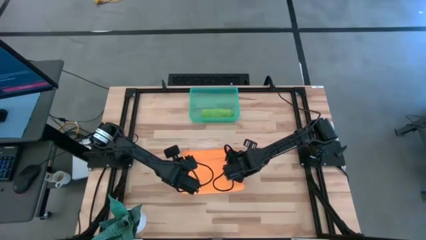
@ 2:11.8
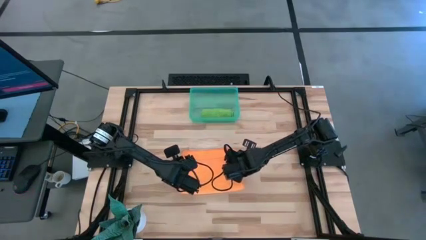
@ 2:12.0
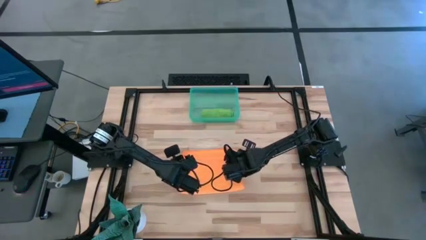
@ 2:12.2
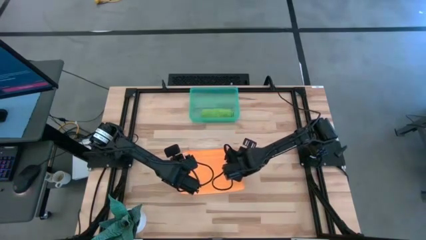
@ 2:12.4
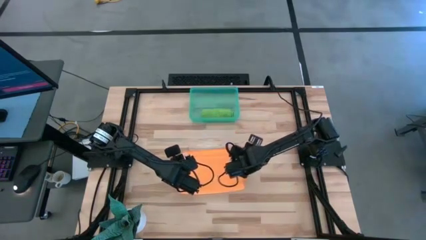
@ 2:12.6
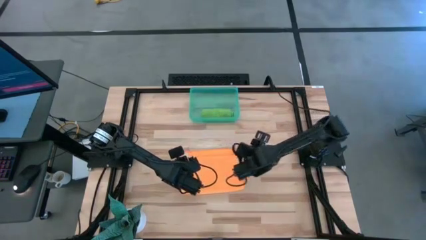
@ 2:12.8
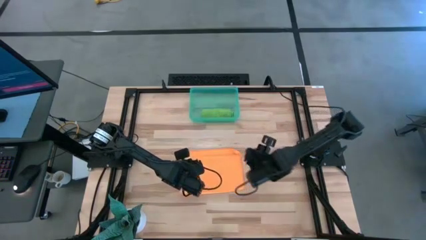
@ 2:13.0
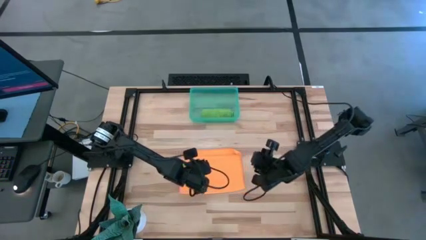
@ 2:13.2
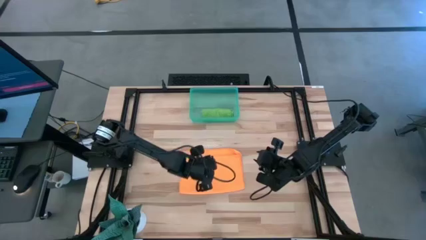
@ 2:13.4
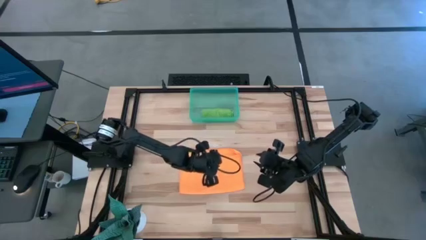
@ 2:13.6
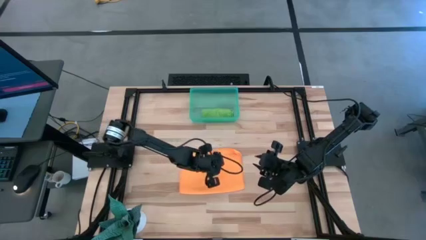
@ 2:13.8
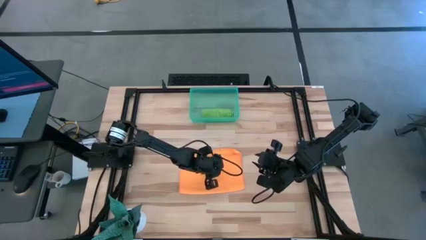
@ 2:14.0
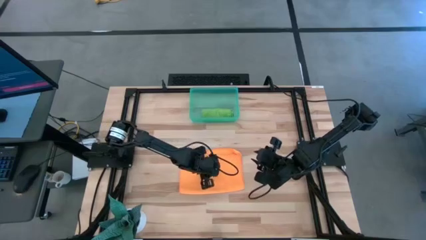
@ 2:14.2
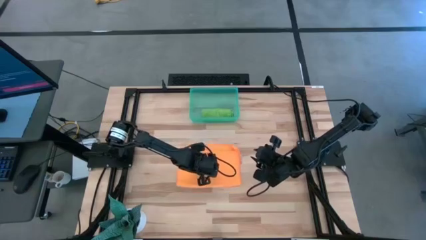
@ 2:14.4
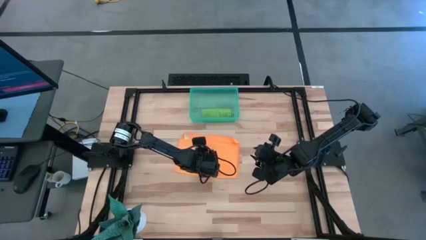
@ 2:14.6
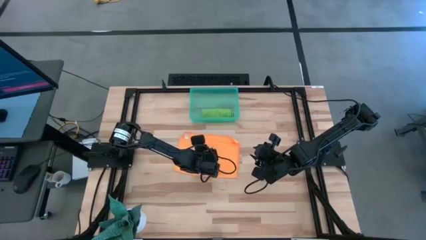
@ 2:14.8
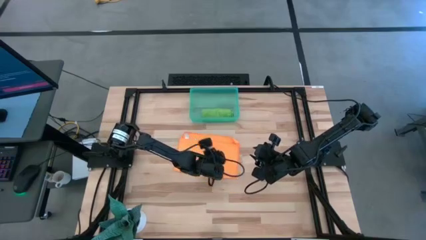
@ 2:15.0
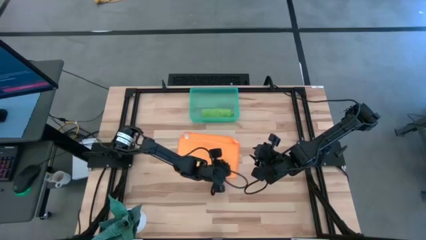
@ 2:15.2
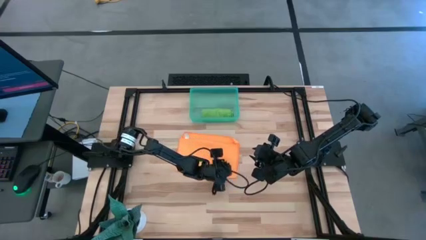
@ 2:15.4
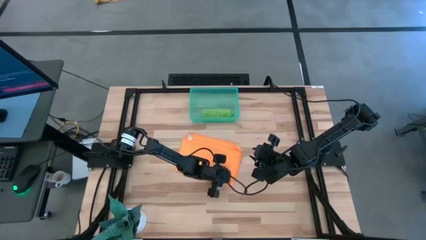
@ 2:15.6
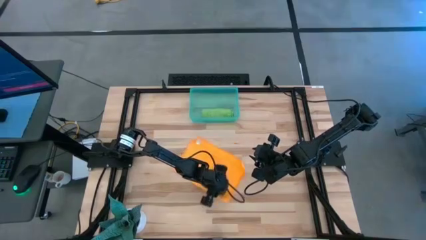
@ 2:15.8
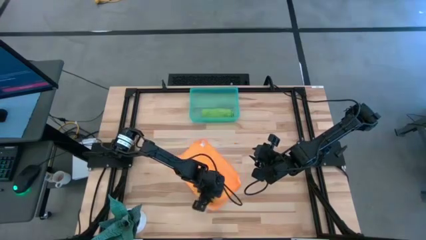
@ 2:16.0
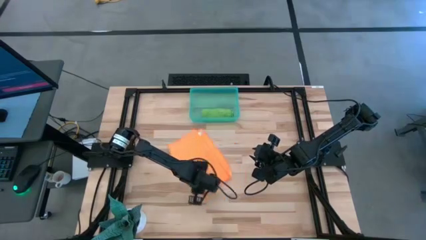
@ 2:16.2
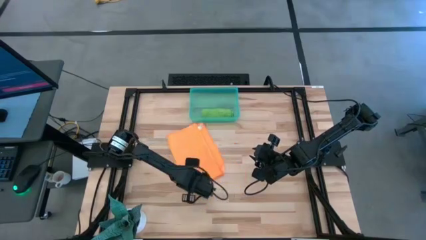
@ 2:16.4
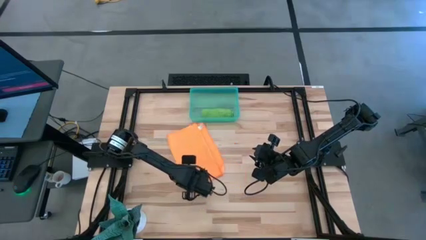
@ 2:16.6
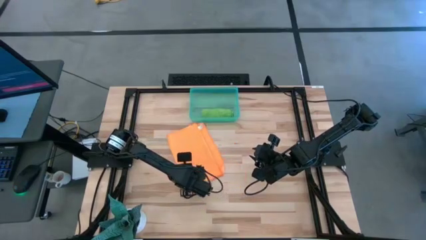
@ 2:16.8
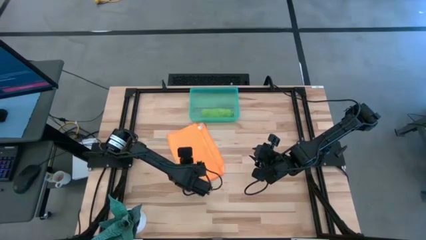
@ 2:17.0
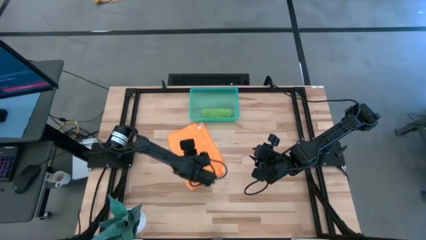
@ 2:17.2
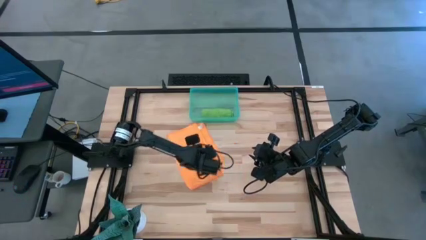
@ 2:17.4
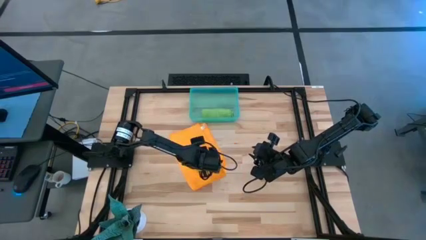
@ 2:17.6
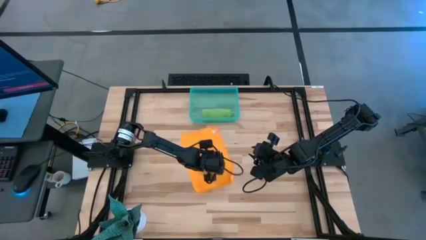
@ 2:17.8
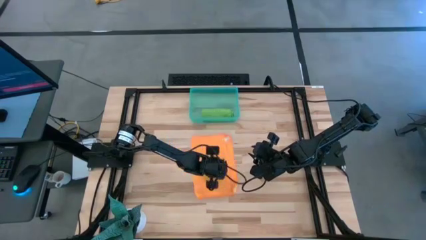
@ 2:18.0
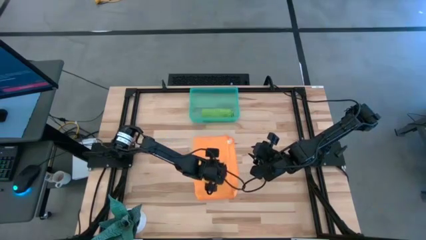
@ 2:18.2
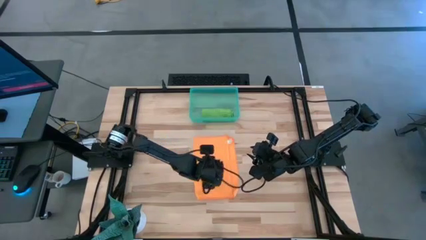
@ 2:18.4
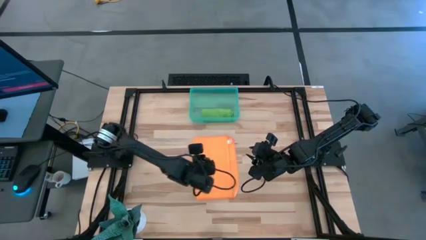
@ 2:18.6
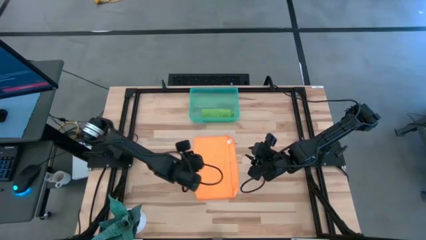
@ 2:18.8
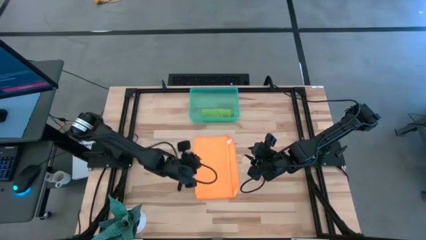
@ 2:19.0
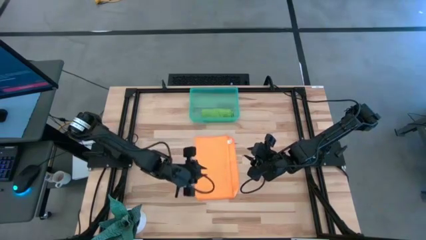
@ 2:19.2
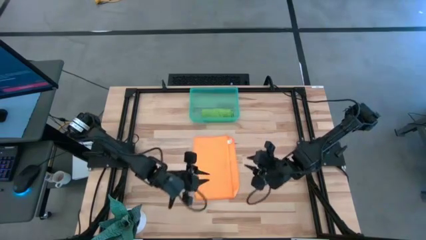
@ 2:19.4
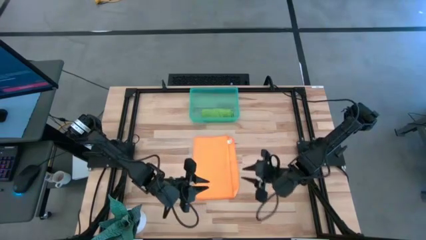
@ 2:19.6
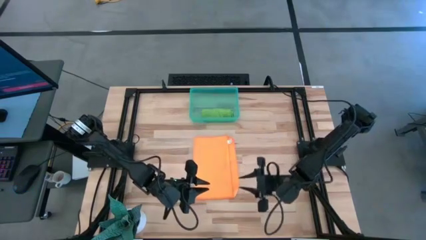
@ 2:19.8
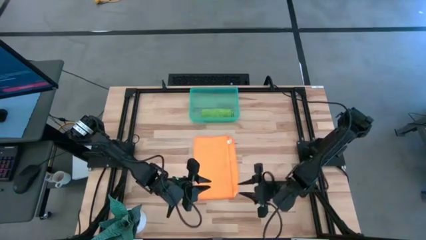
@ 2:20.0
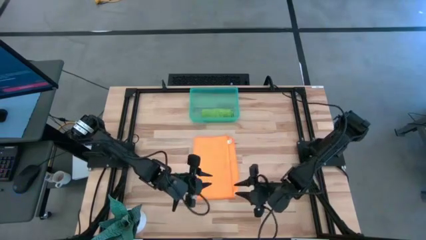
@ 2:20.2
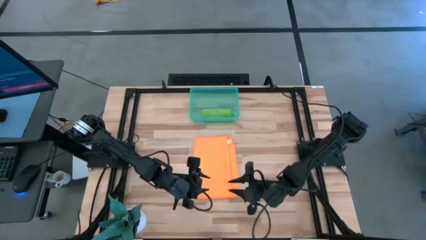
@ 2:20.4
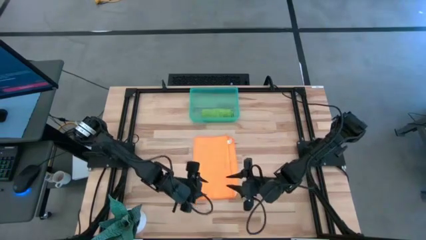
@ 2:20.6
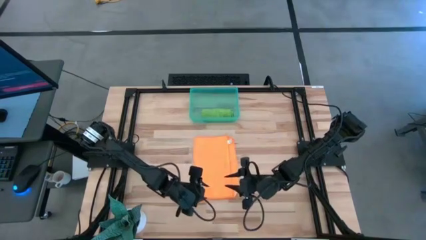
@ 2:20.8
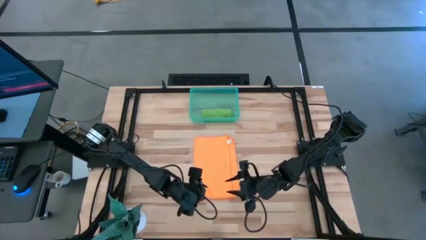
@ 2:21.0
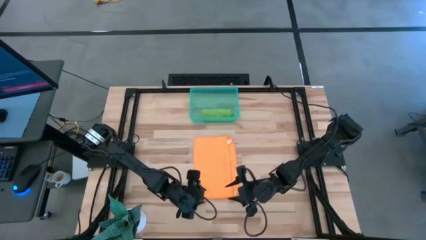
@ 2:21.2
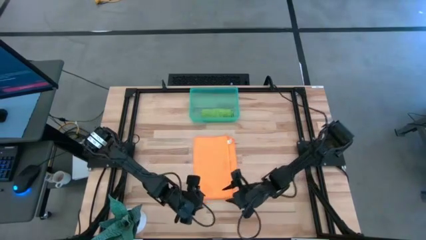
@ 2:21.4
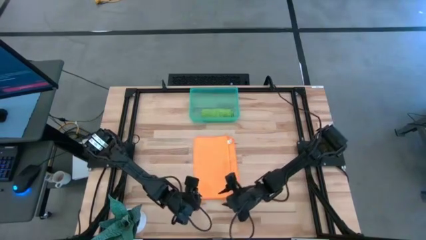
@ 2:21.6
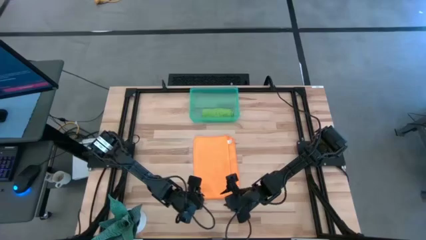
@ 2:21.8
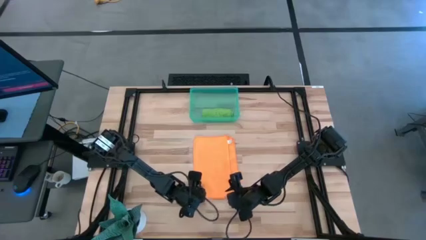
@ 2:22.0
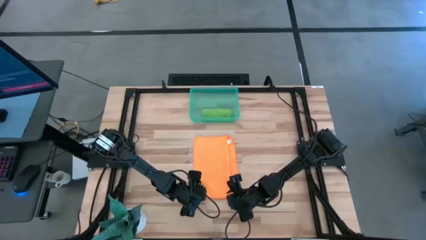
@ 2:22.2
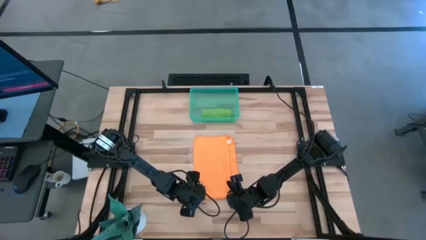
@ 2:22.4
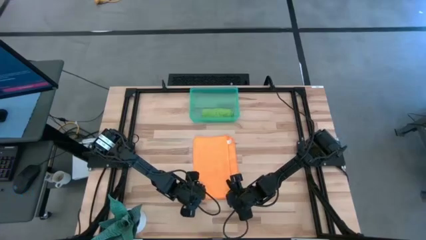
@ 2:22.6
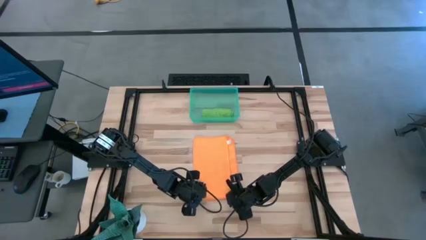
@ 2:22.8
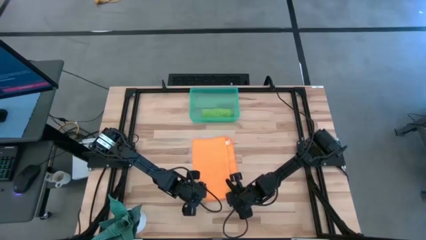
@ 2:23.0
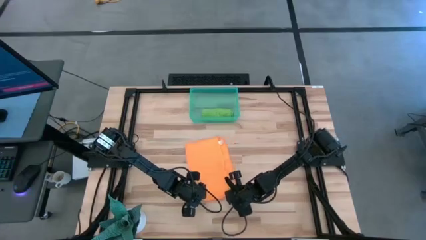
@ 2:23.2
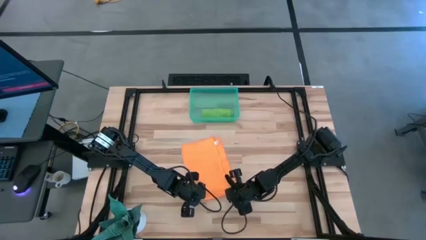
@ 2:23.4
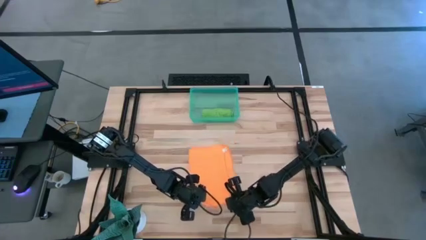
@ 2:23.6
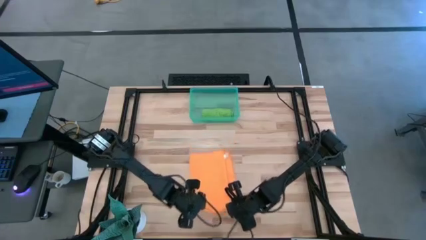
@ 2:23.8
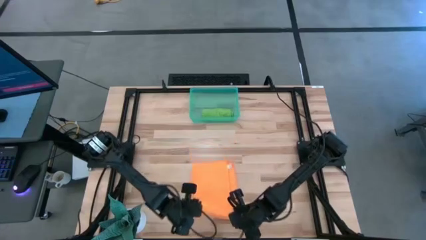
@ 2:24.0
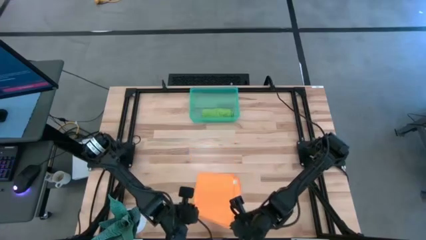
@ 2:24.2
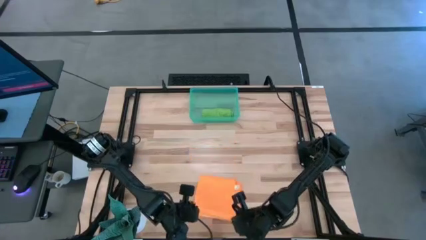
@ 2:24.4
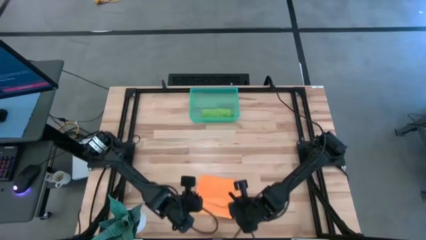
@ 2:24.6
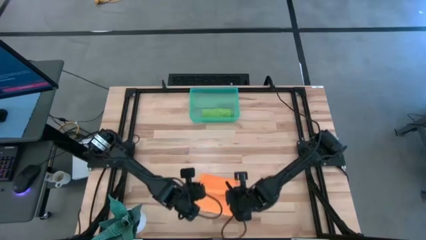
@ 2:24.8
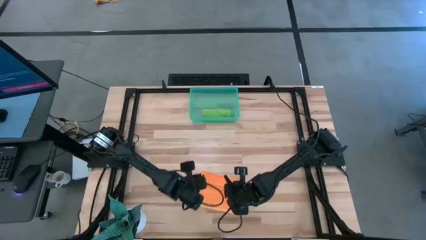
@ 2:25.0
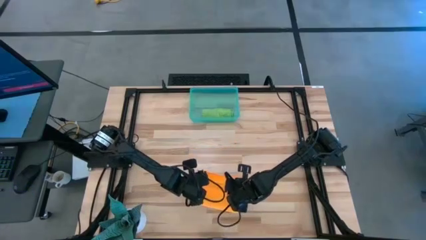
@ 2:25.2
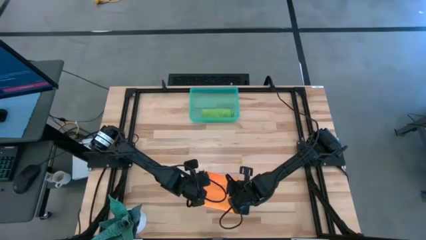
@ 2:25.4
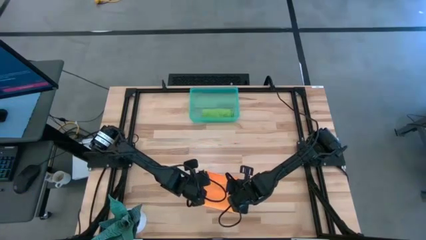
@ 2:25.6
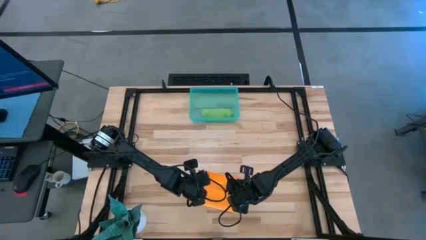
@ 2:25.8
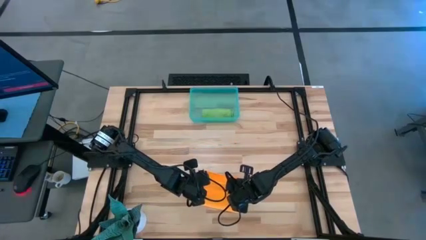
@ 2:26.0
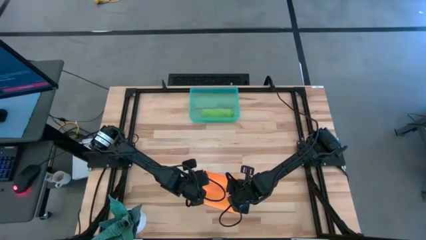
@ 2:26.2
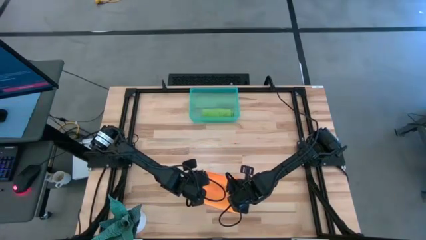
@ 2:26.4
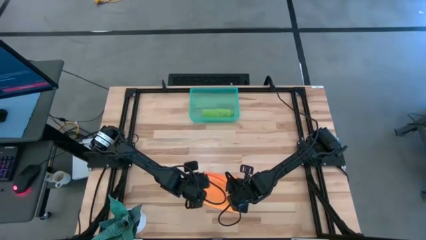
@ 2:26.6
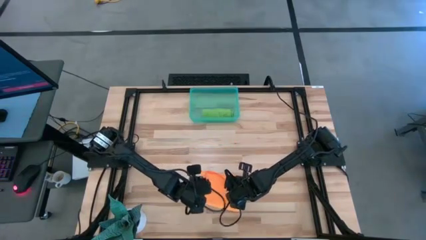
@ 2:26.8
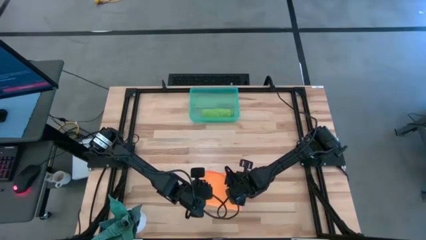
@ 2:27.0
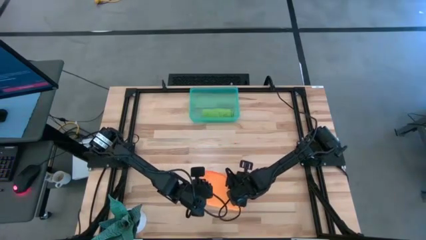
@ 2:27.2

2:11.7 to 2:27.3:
Task: Roll microfiber towels into tight, uniform cylinder then place into a basket
Fold the orange towel
